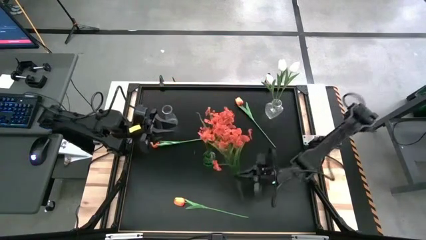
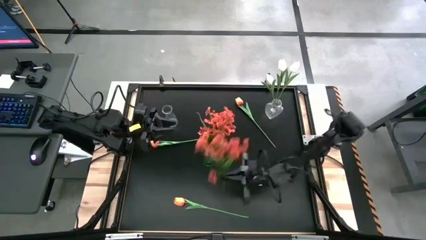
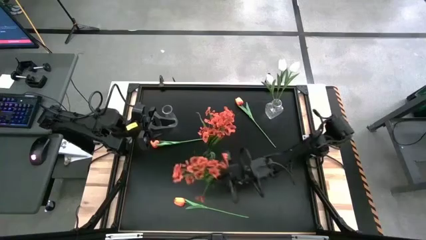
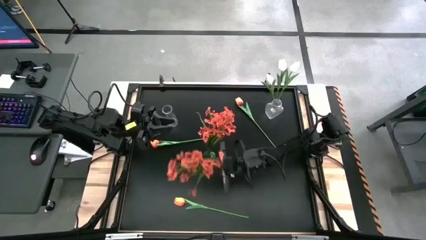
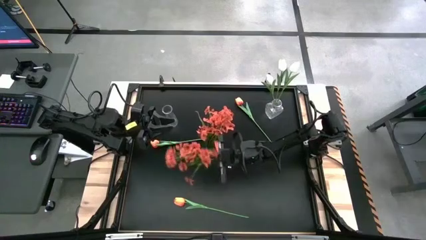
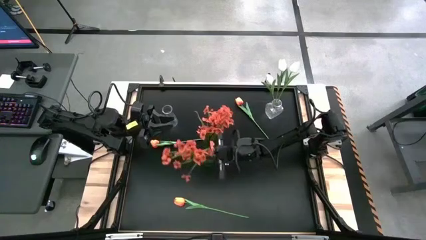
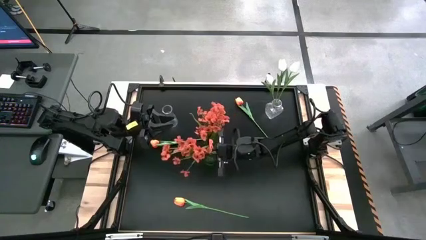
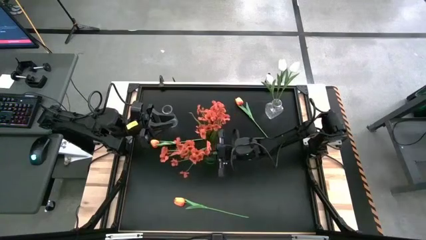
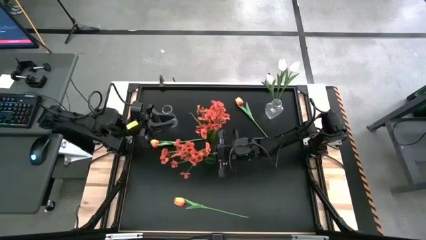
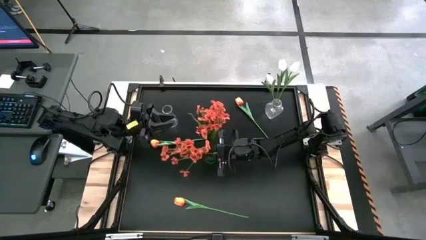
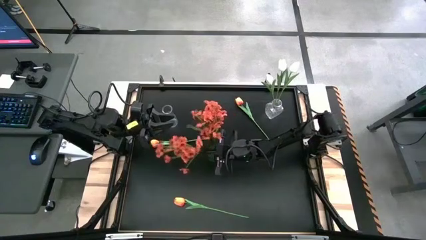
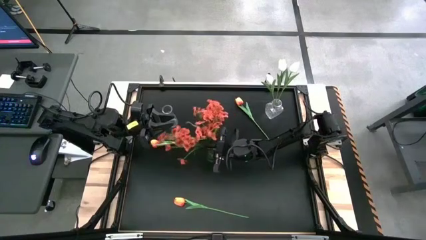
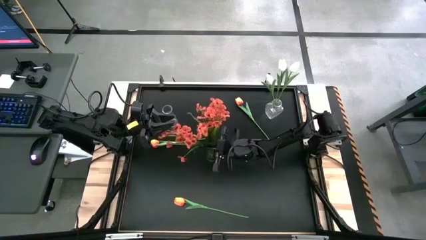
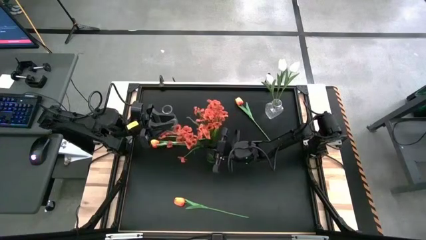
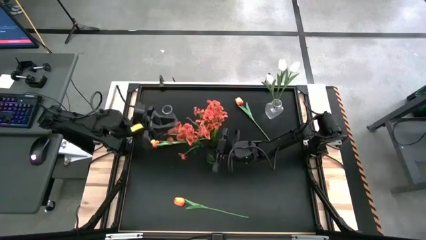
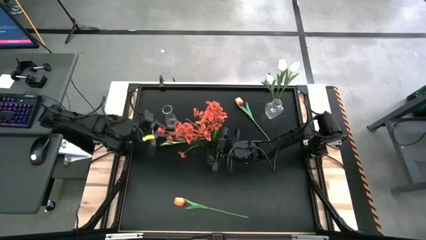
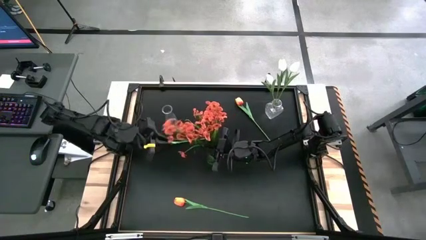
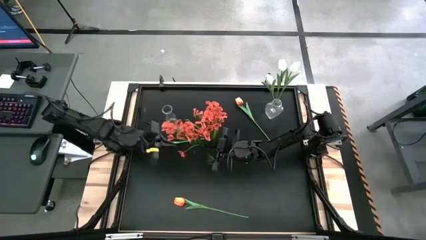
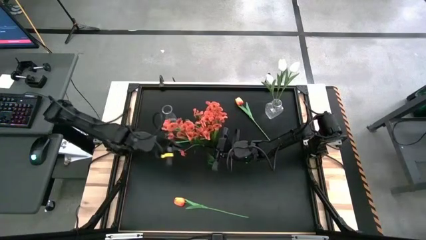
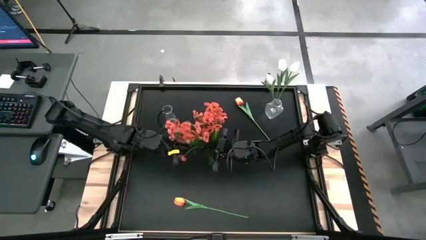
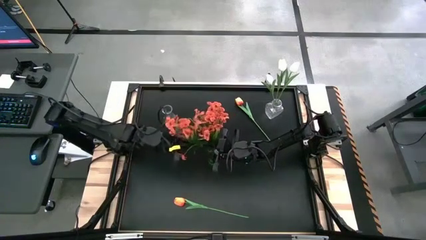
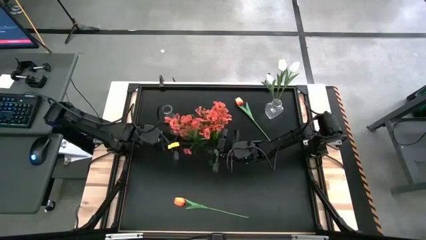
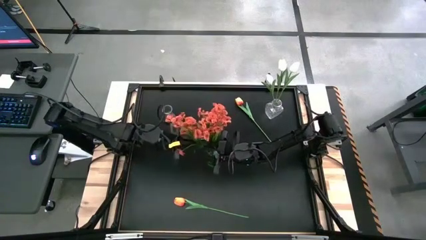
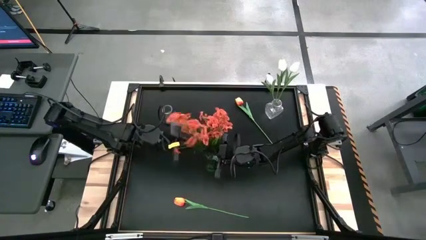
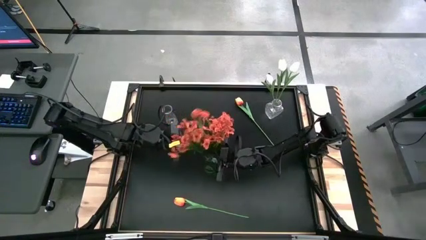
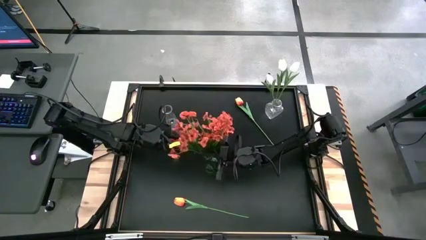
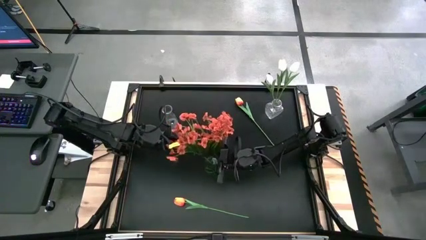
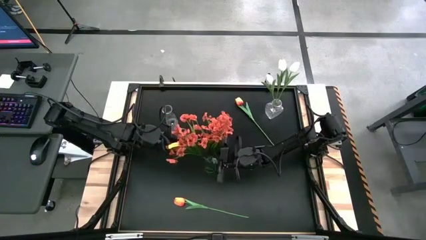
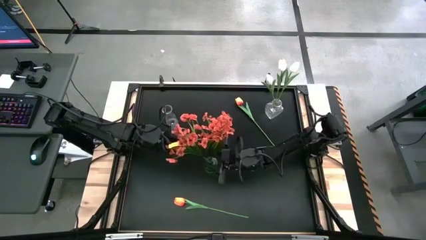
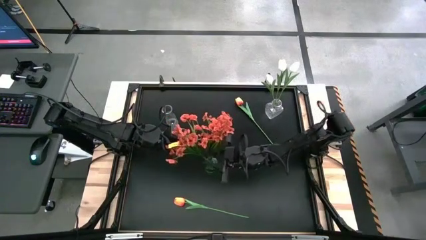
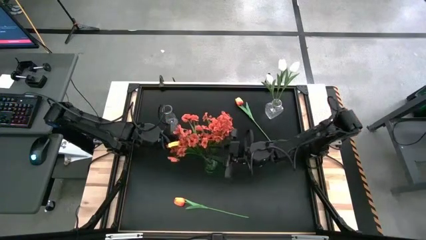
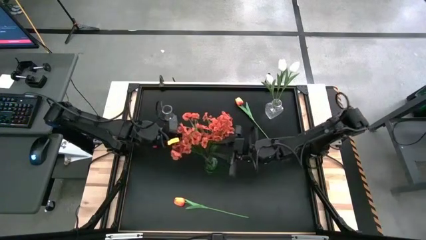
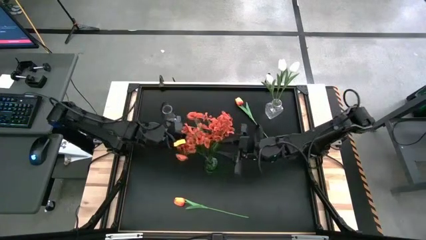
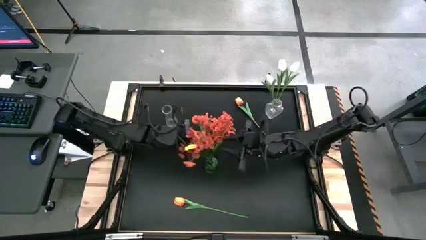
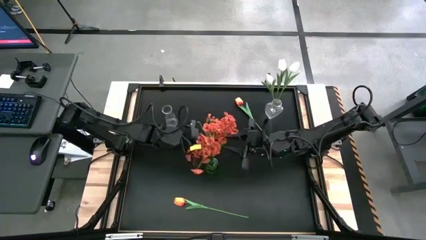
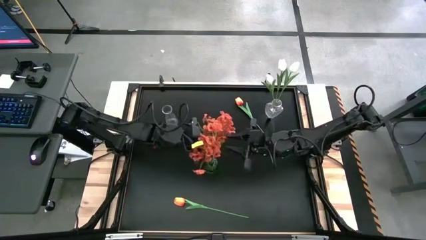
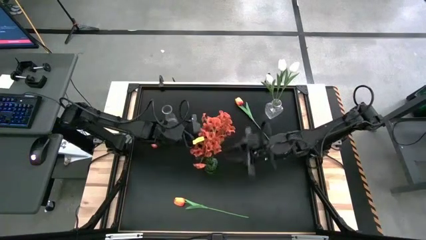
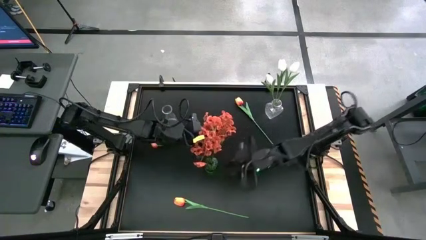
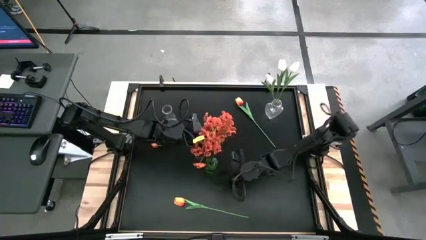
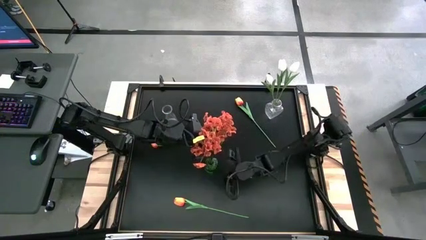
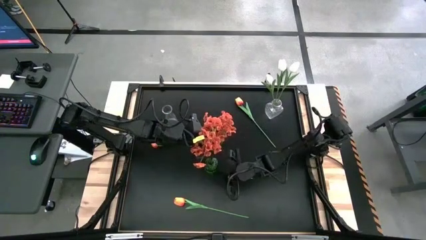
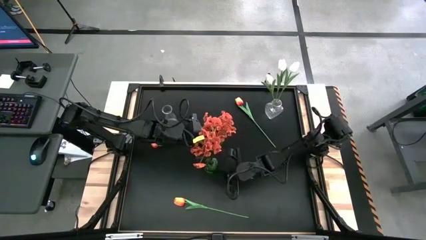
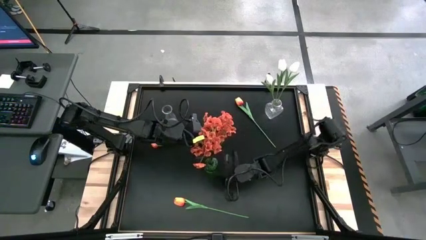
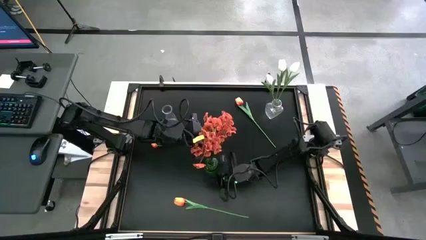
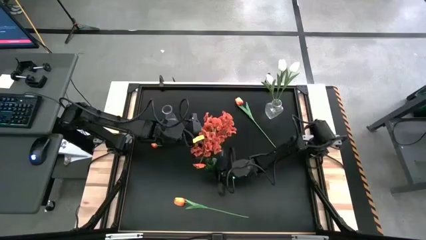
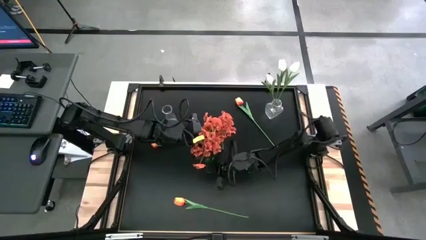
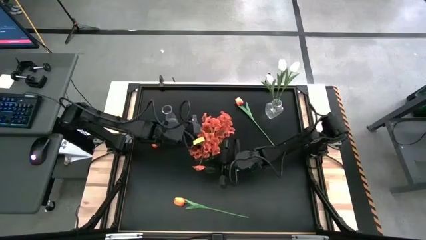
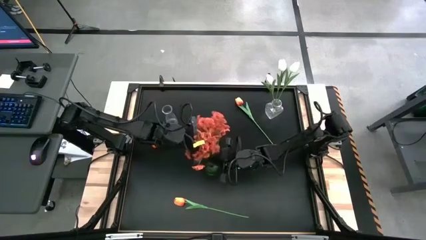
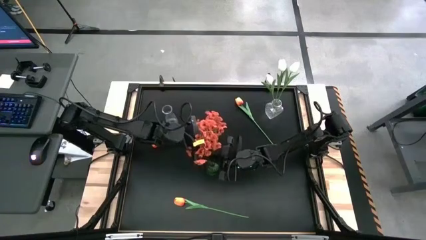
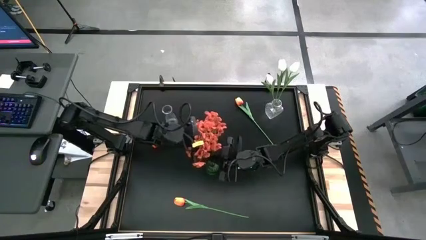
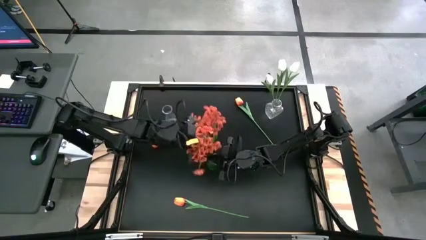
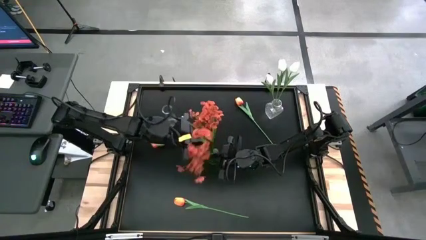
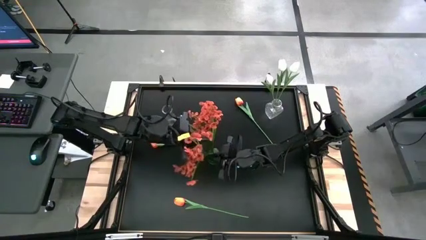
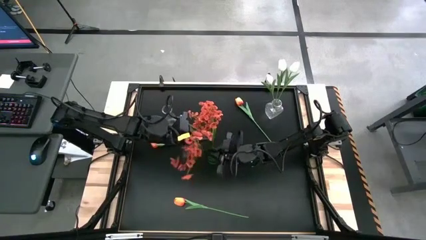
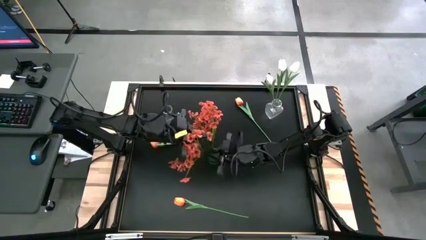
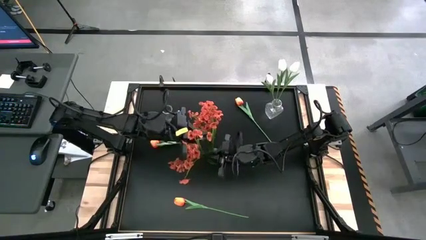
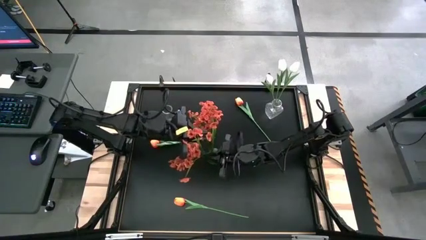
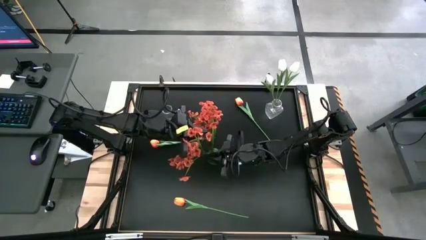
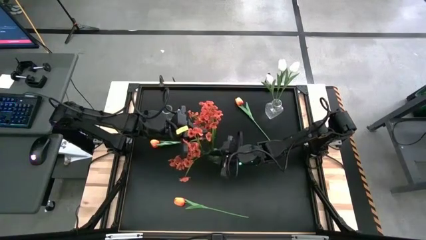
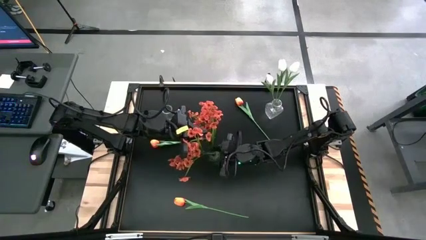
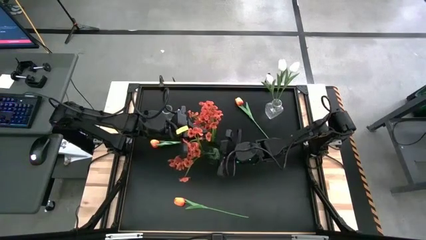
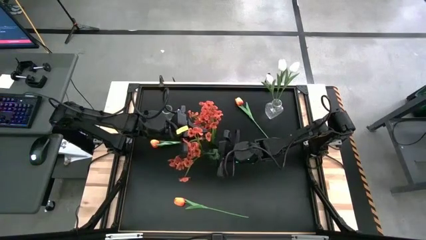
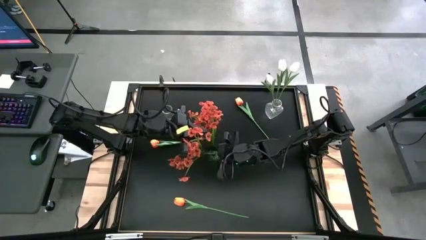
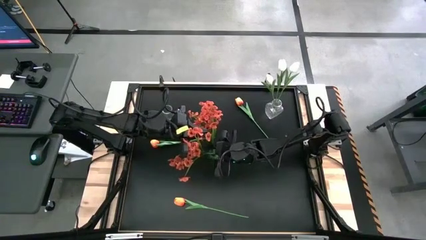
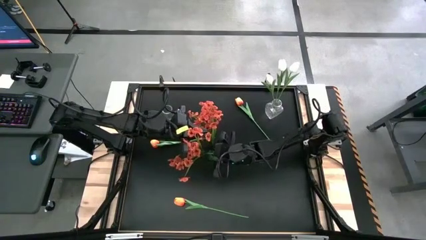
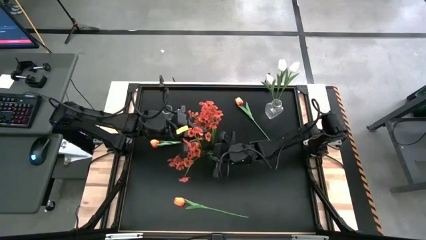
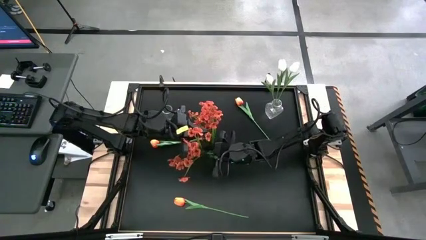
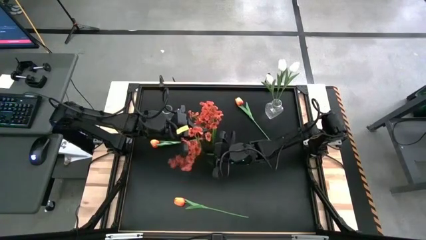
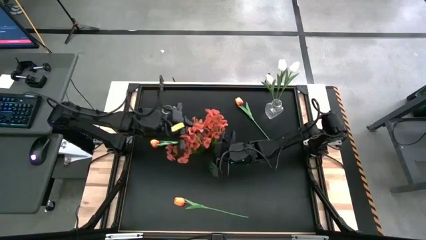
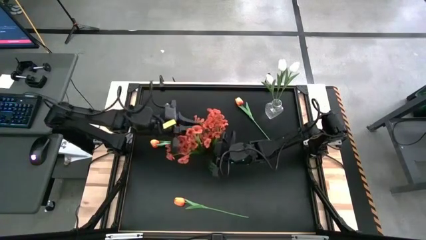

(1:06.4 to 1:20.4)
Task: Sort flowers into vase by color
Put the orange flowers into the green vase

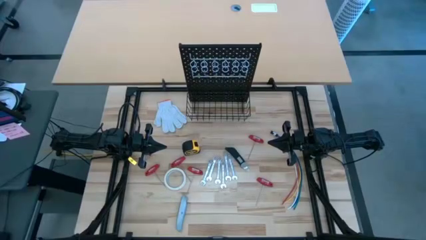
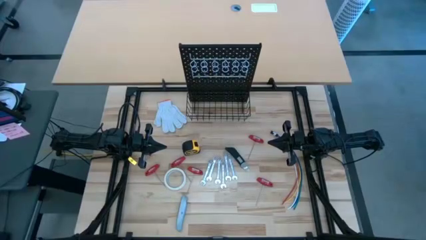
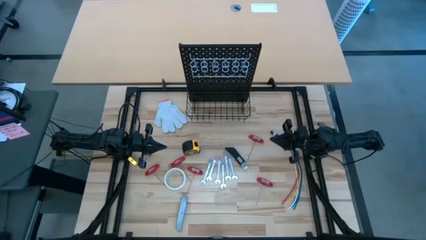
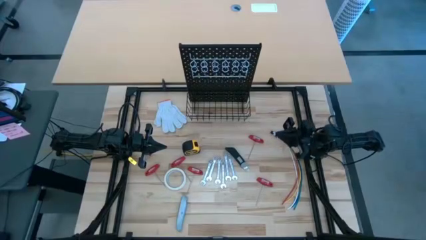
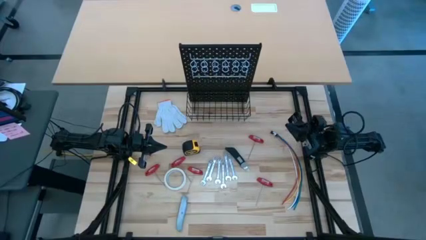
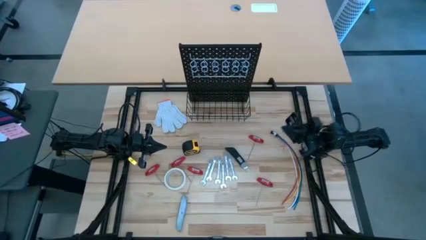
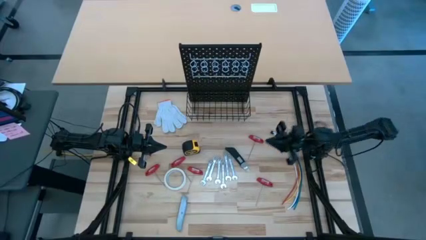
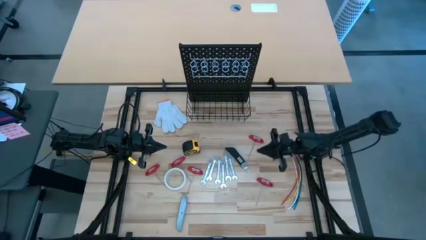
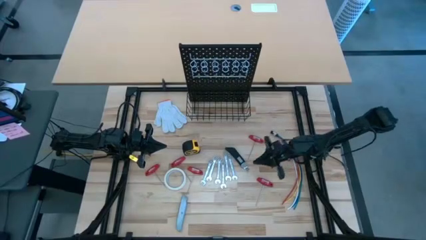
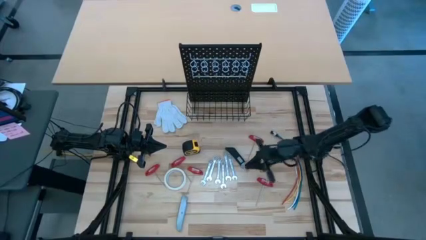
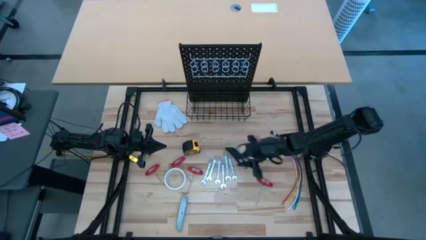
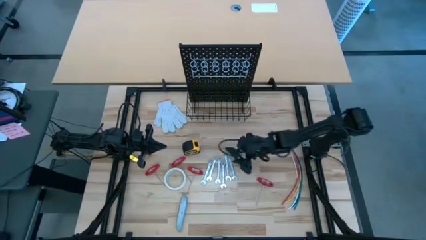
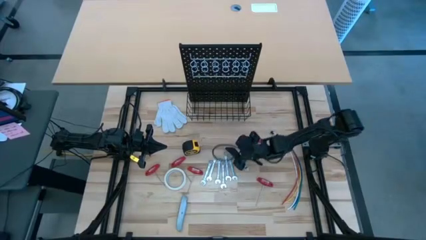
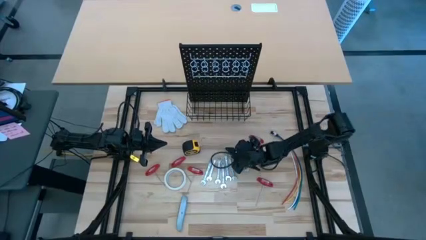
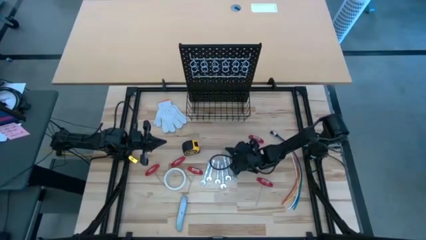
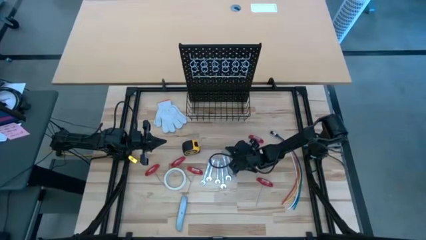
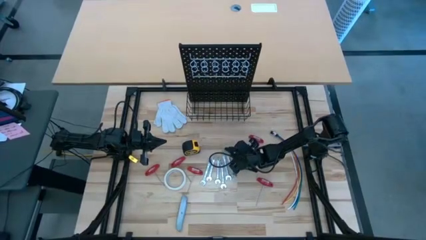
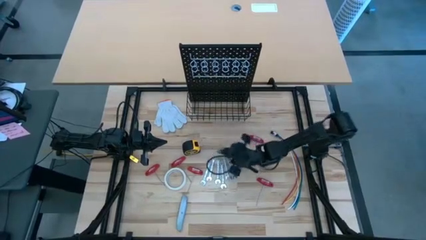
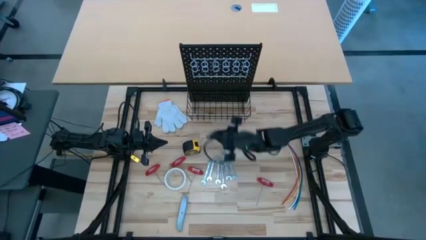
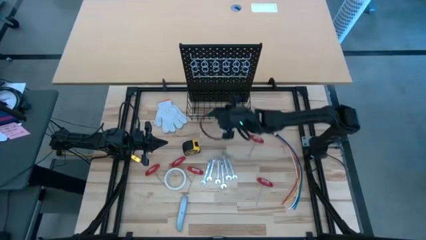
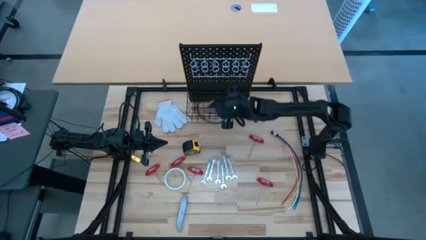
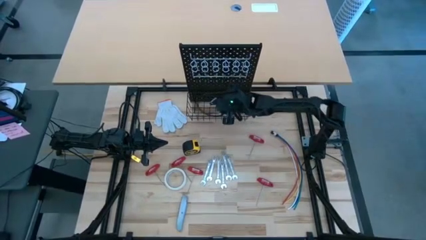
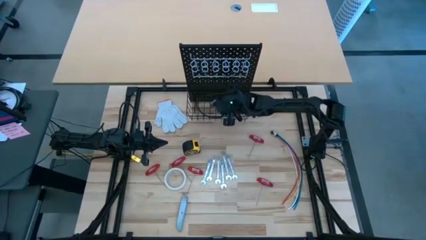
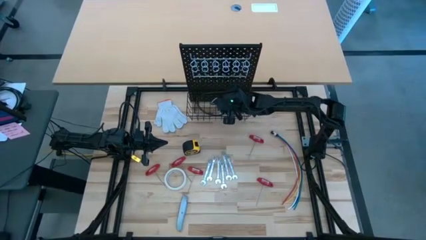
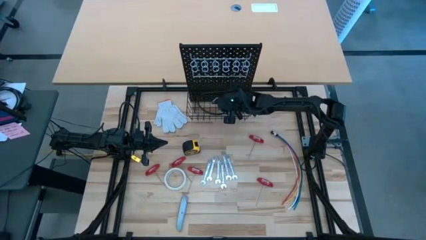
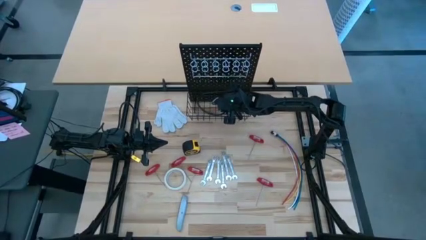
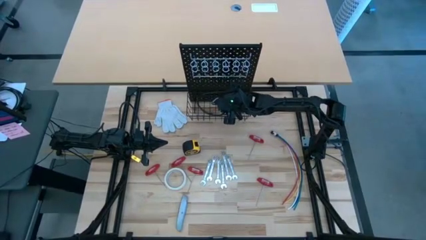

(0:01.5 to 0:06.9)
Task: Hang tools onto peg board
Put the black cutter into the wire basket on the pegboard
